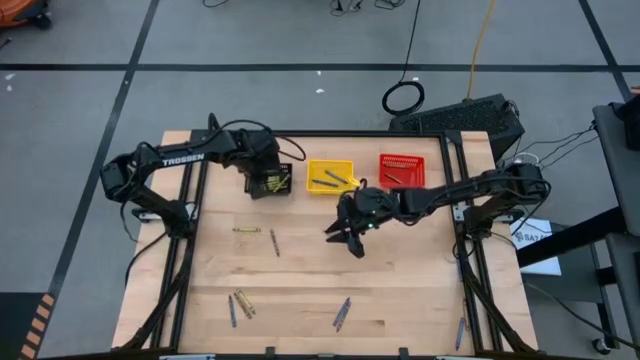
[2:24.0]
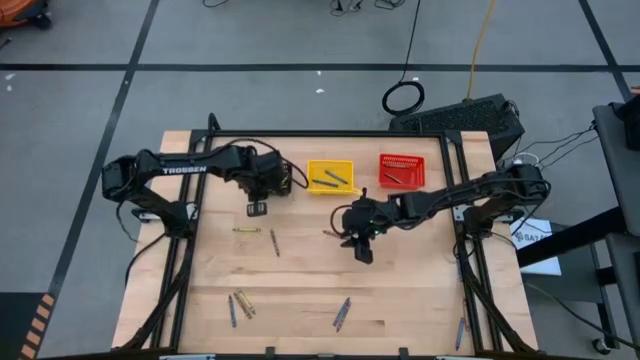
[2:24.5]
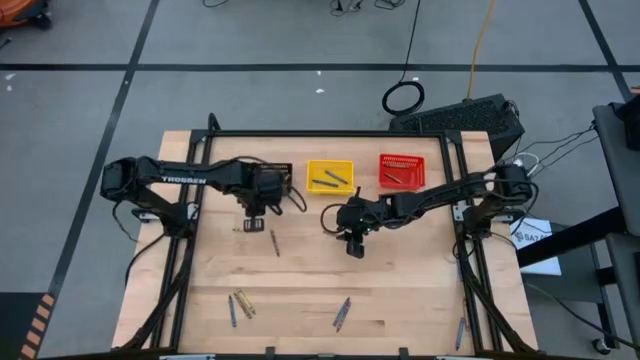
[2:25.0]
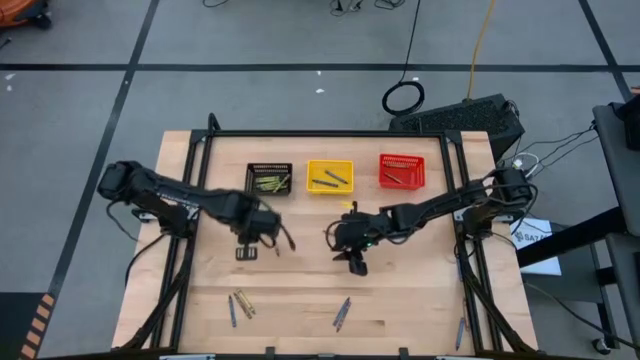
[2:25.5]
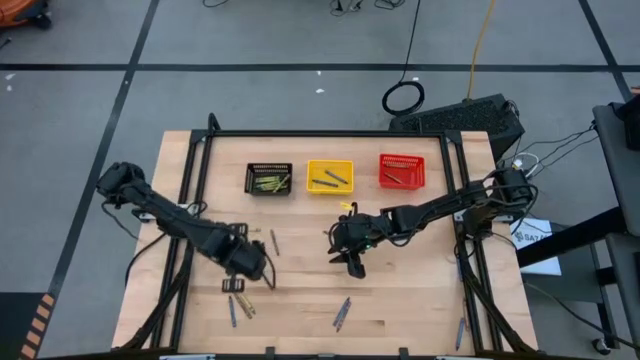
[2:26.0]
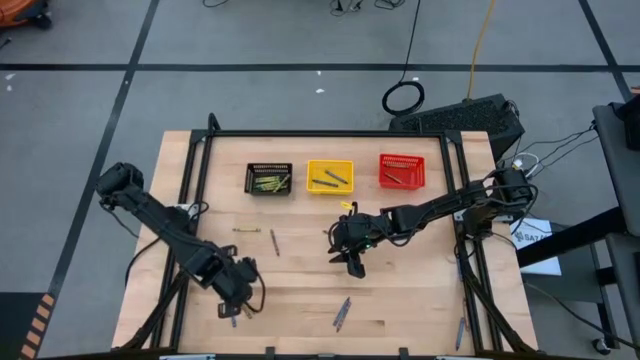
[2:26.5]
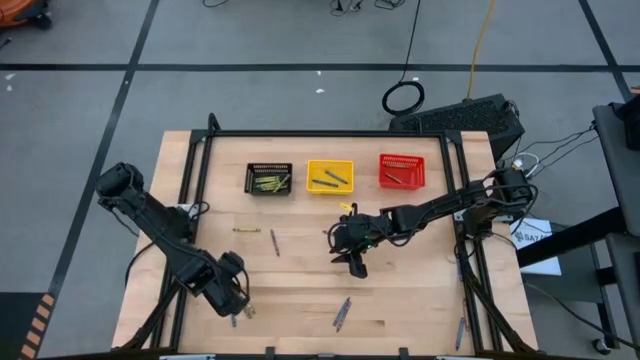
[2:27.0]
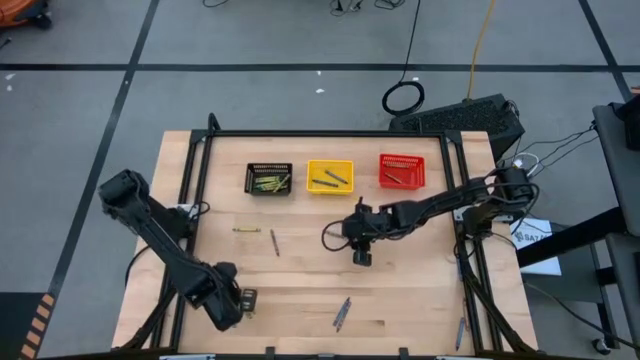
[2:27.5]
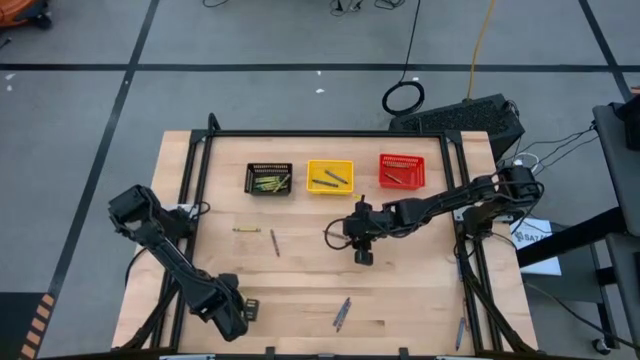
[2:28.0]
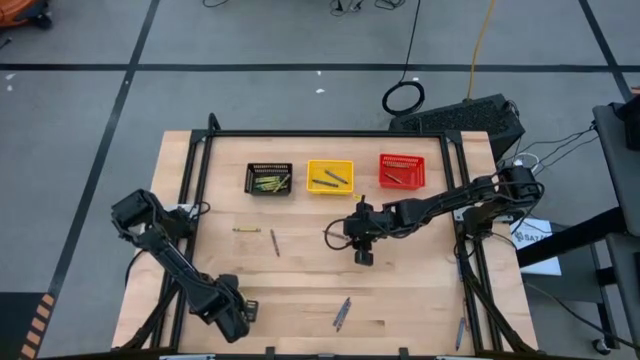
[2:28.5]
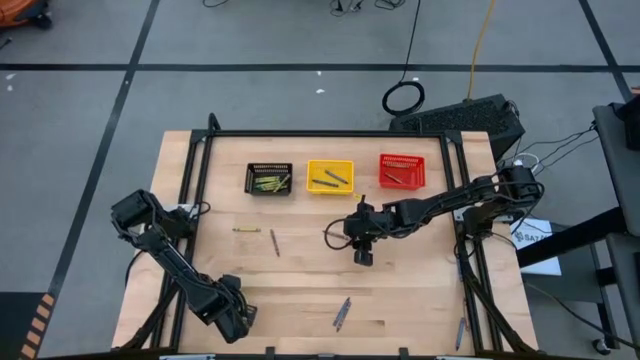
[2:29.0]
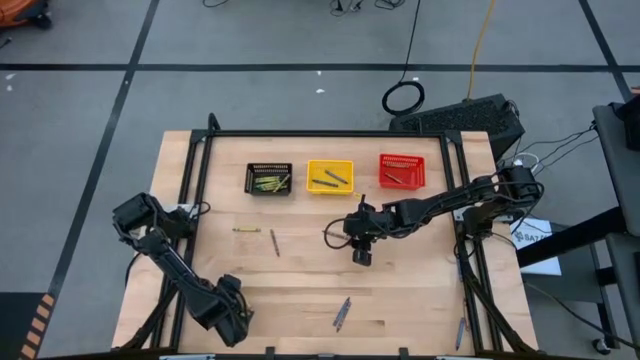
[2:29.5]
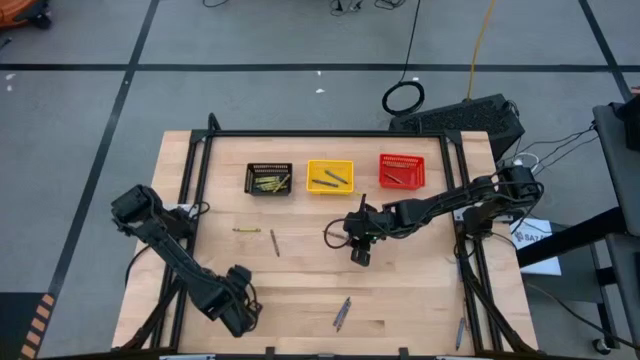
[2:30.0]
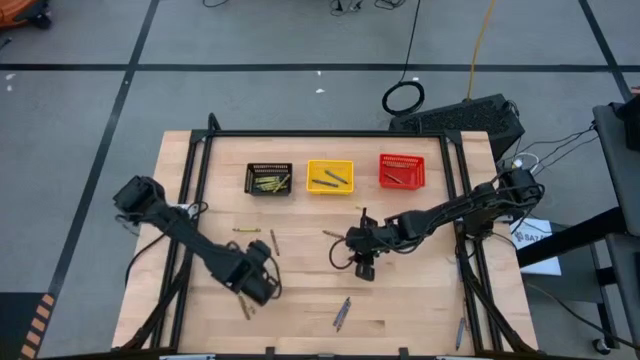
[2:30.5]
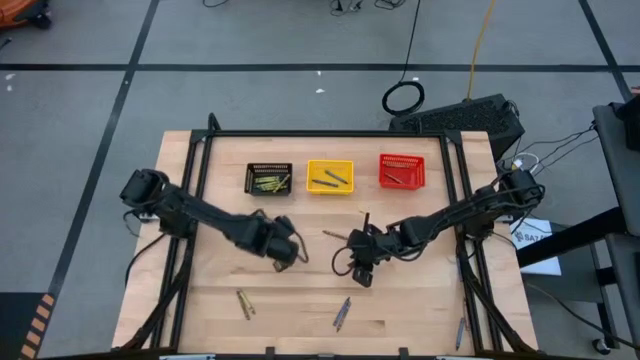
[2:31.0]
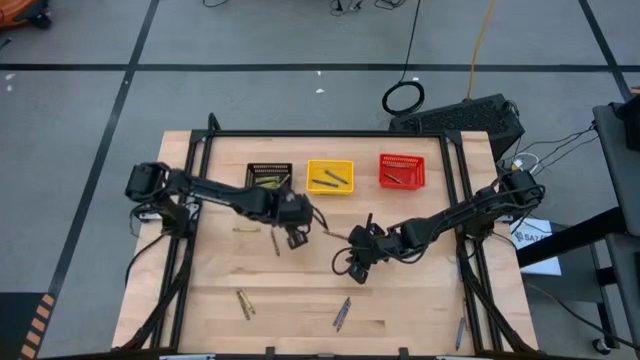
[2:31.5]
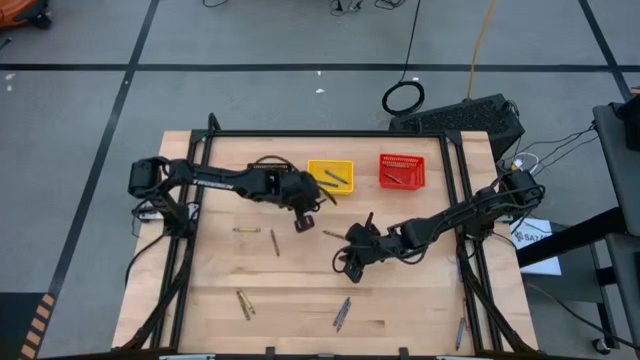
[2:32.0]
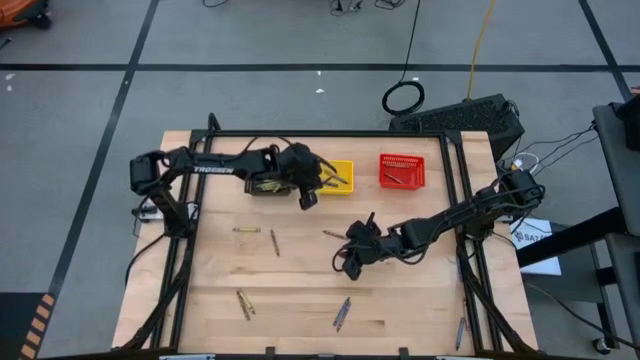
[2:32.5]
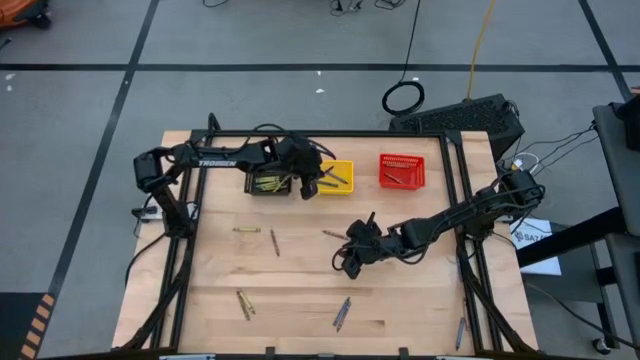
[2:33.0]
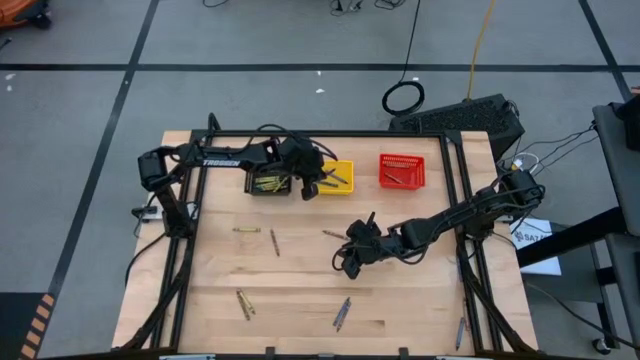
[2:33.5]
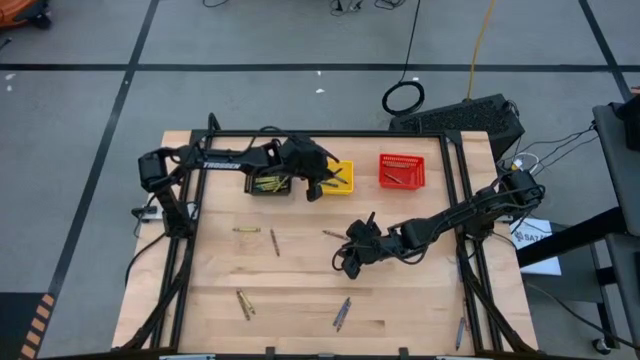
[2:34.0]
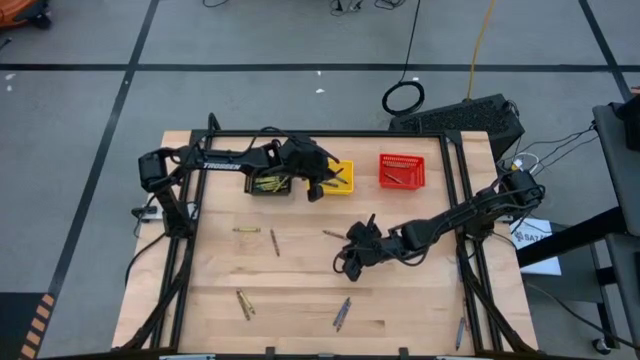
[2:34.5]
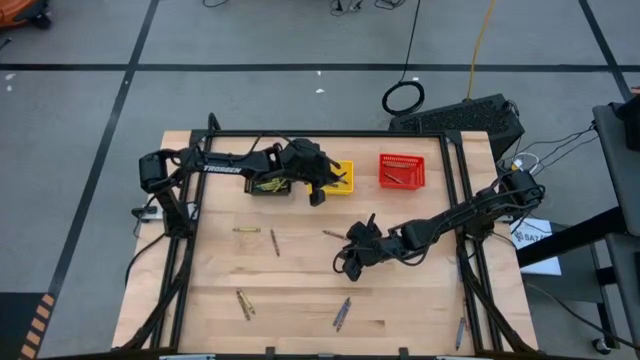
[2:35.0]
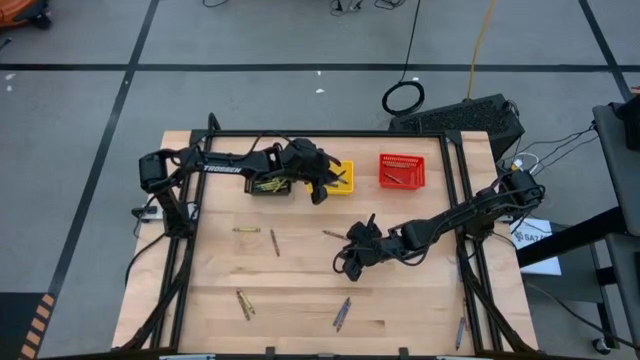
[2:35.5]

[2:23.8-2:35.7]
Task: Sort crayons
Put the blue crayon into the yellow bin

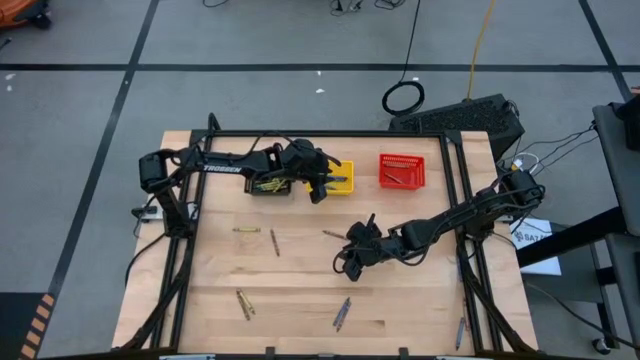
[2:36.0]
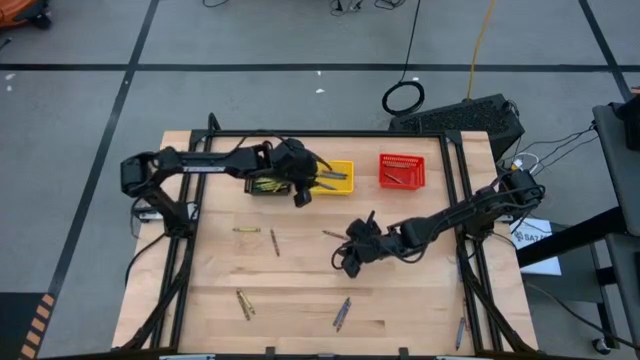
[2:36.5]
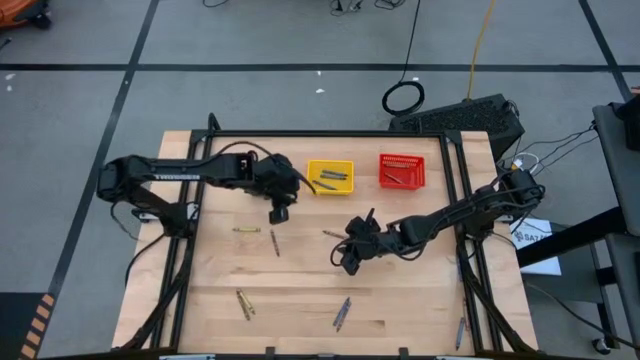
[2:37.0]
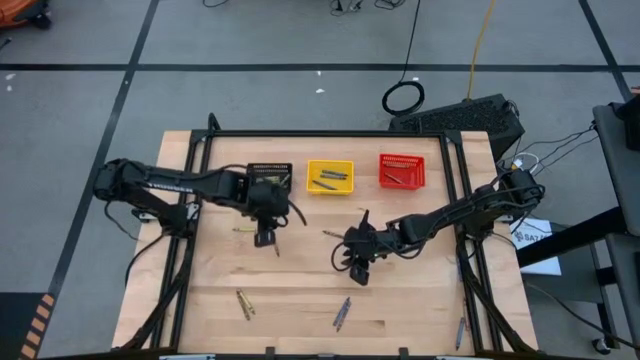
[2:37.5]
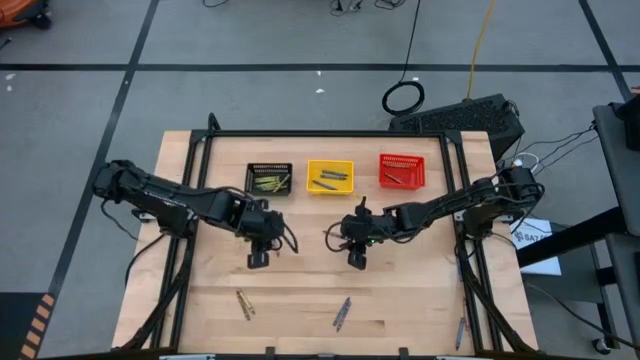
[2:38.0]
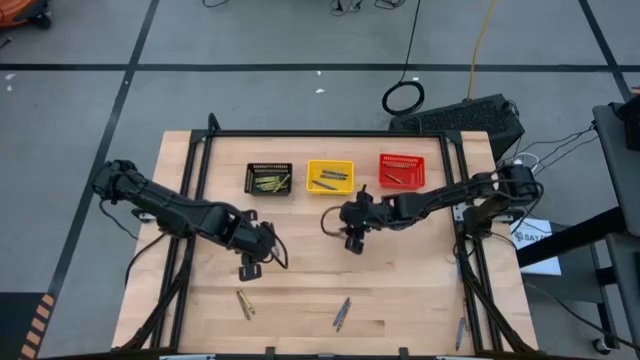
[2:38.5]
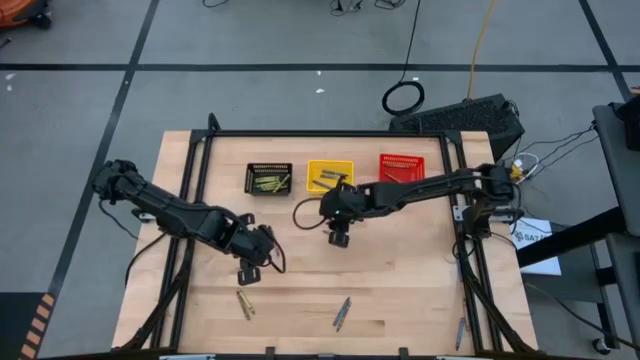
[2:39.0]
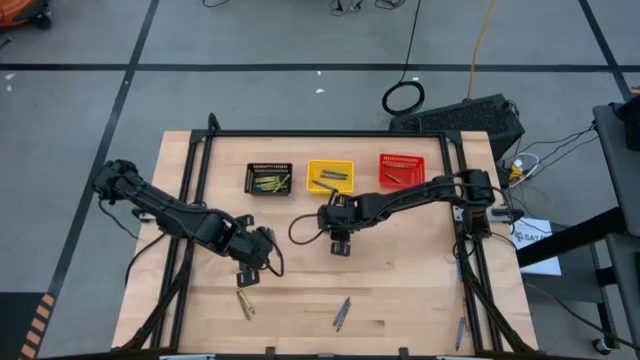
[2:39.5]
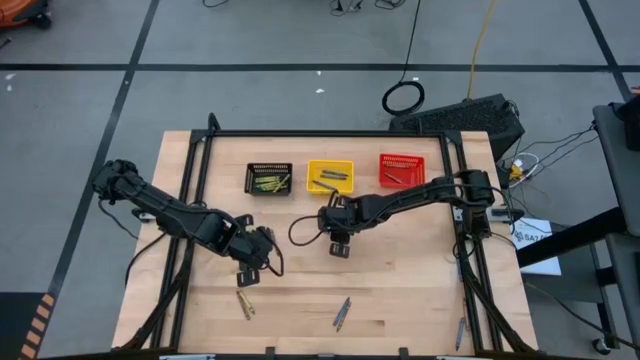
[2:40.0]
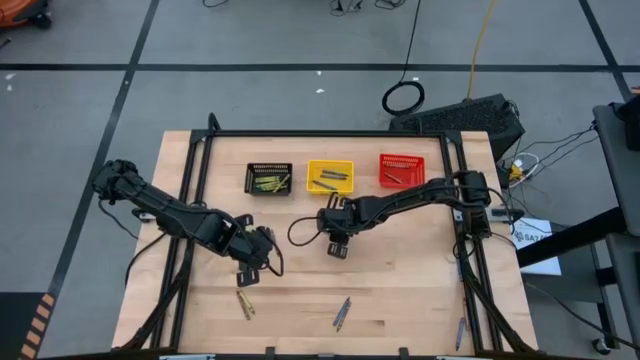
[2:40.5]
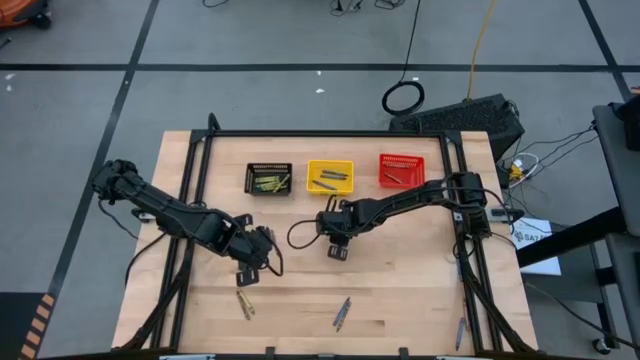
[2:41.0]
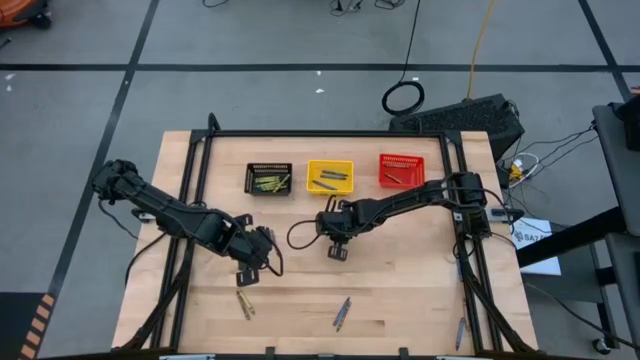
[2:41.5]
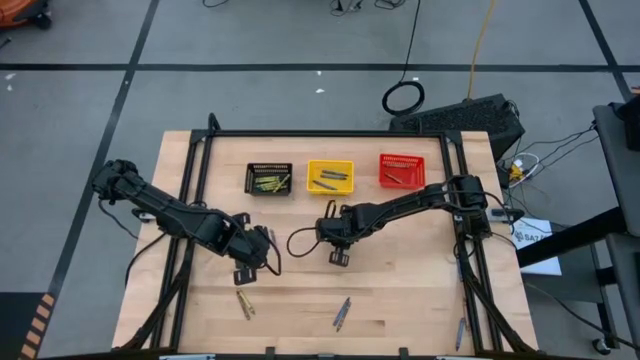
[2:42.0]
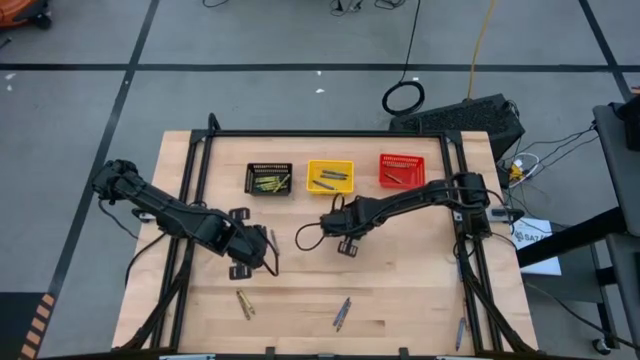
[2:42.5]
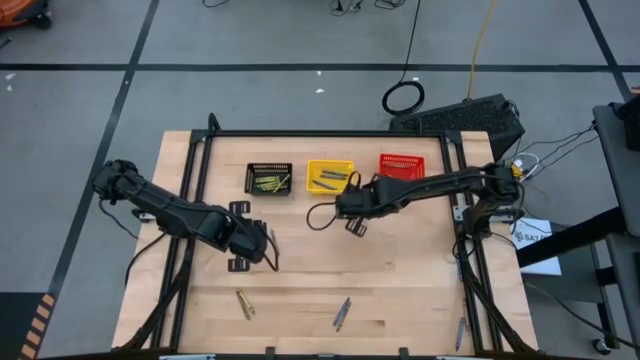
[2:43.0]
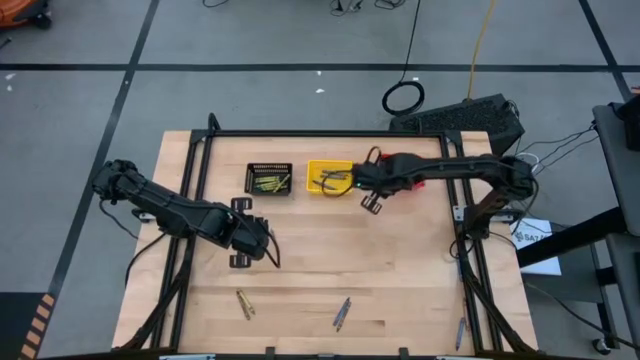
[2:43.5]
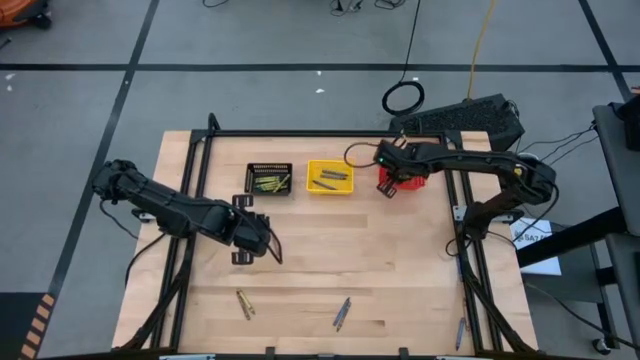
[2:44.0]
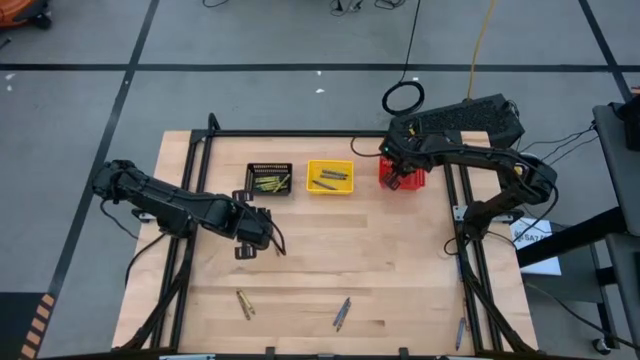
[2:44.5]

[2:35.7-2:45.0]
Put the brown crayon into the red bin

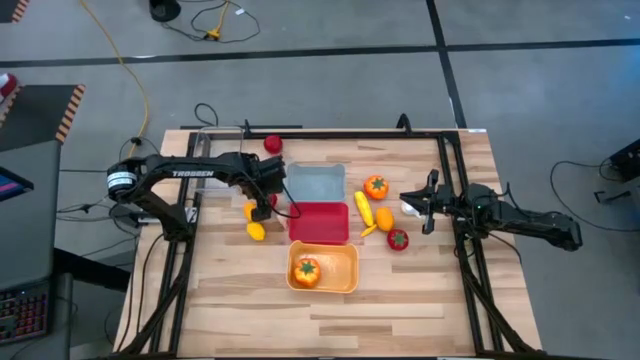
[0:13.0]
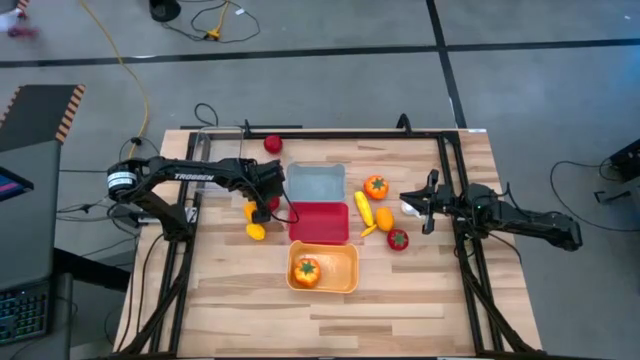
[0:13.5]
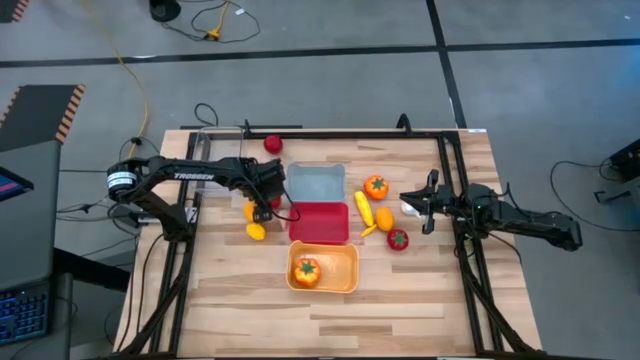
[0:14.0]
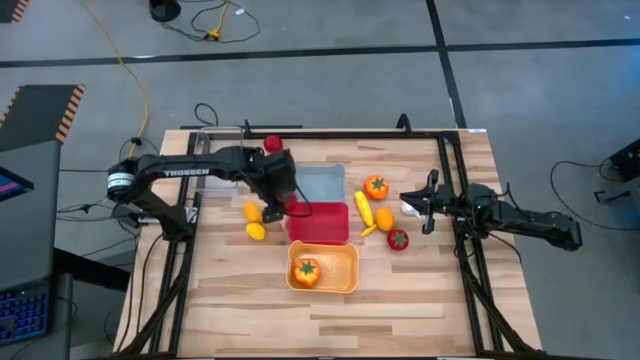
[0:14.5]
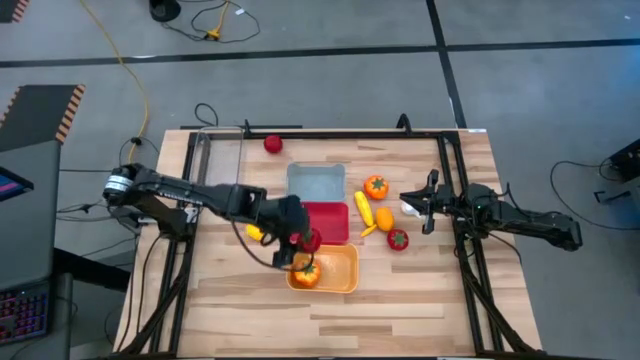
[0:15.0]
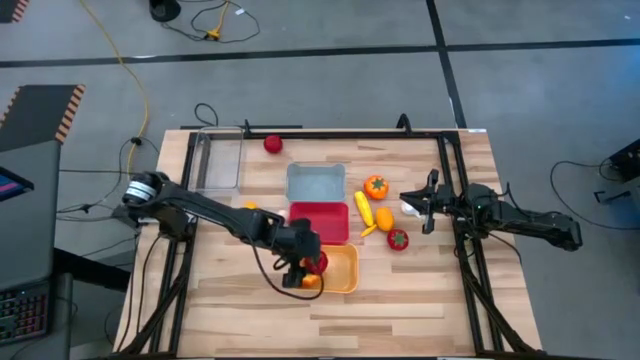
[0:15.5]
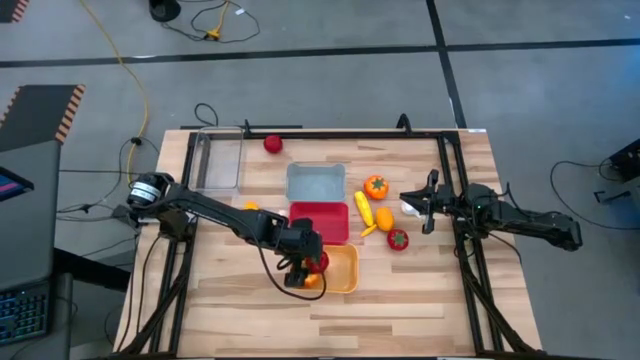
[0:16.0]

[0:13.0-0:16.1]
Task: Sort produce into baskets
Put the bottom left red tomato into the yellow bin
